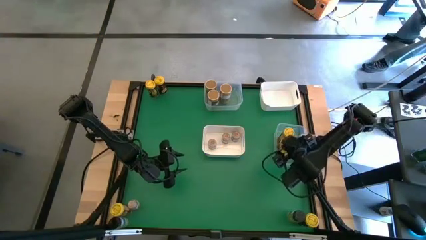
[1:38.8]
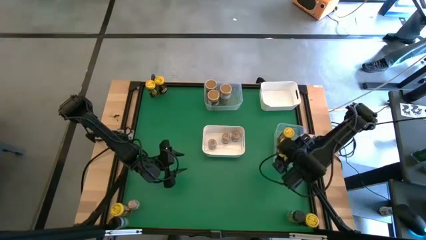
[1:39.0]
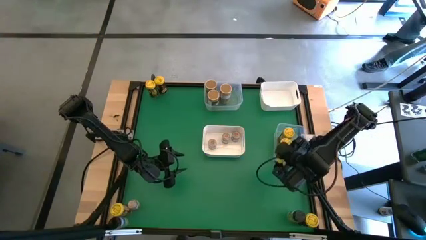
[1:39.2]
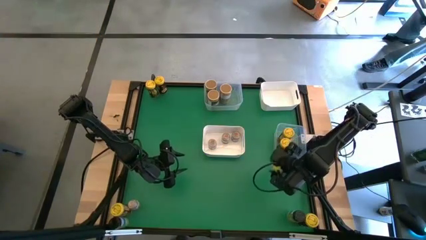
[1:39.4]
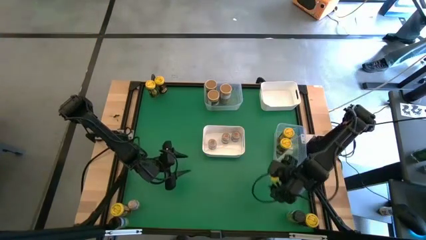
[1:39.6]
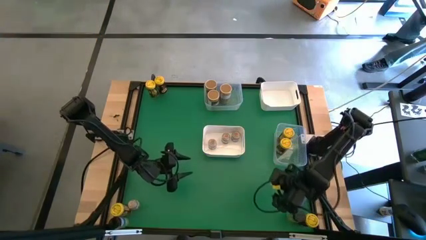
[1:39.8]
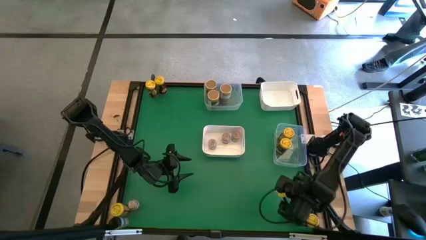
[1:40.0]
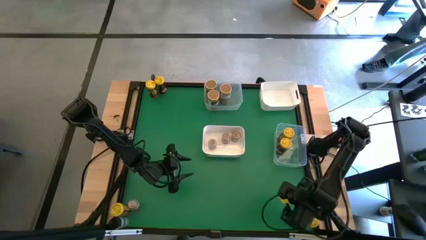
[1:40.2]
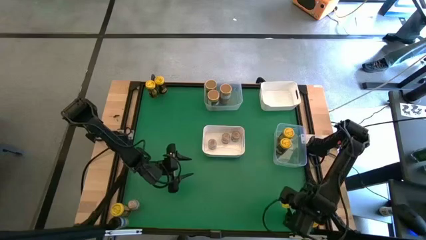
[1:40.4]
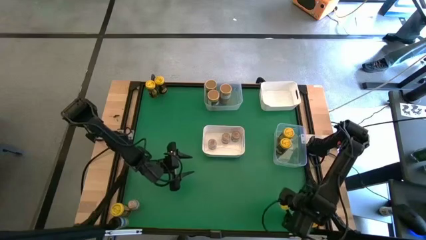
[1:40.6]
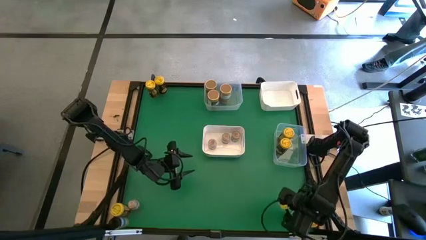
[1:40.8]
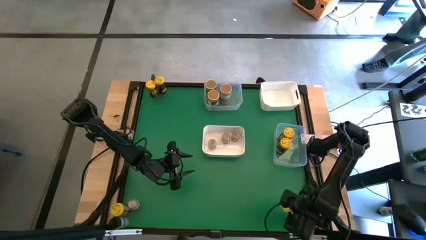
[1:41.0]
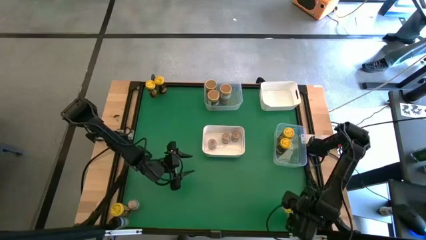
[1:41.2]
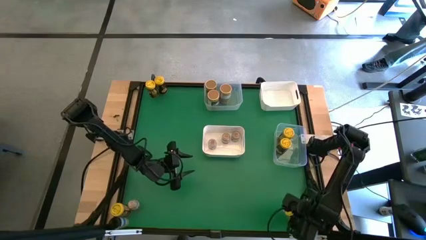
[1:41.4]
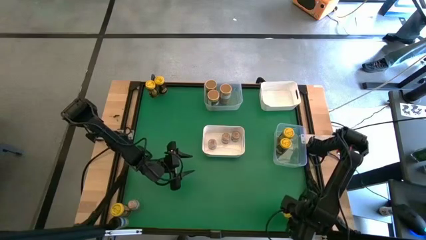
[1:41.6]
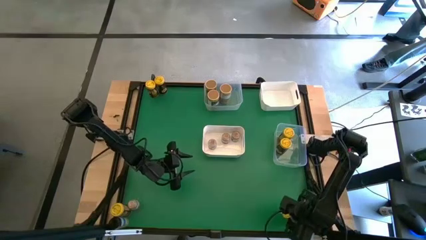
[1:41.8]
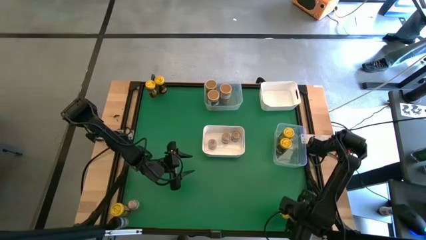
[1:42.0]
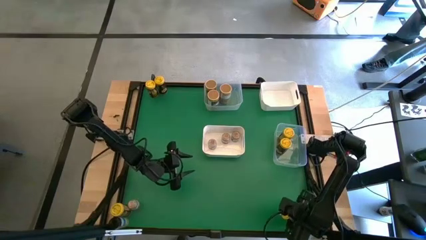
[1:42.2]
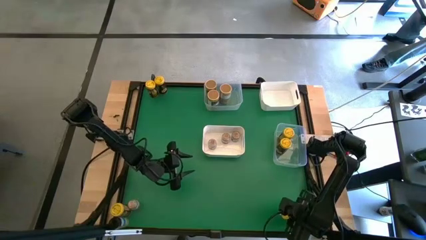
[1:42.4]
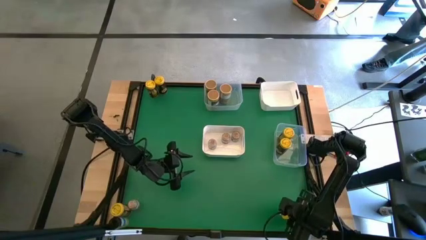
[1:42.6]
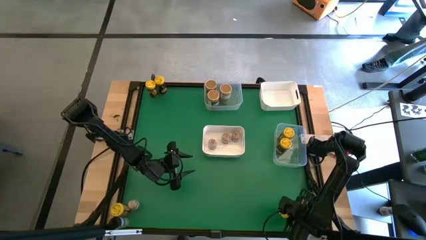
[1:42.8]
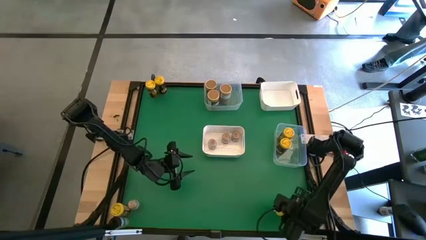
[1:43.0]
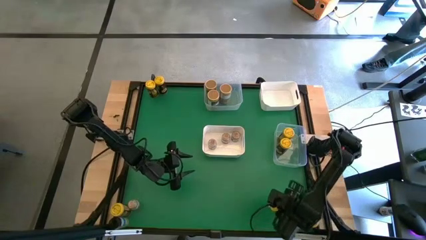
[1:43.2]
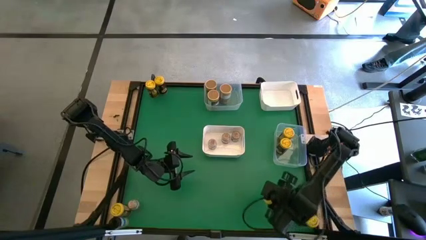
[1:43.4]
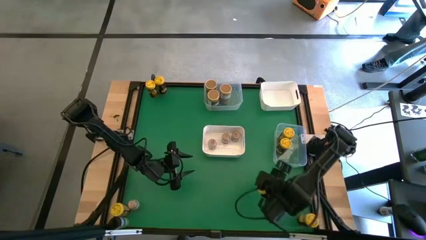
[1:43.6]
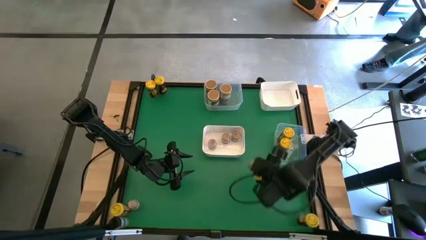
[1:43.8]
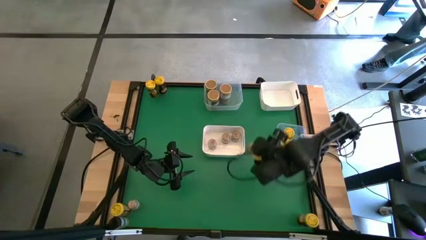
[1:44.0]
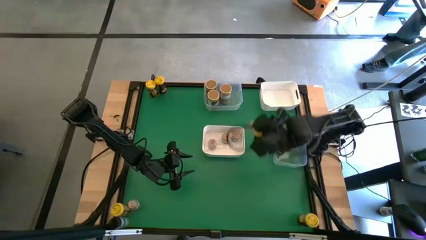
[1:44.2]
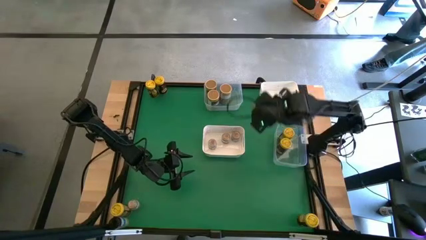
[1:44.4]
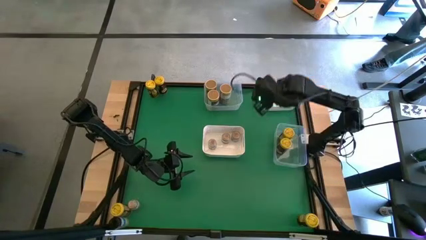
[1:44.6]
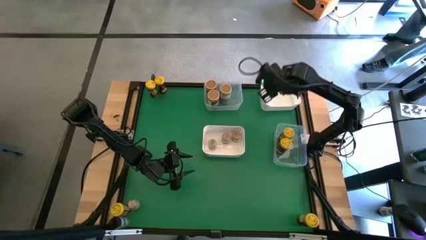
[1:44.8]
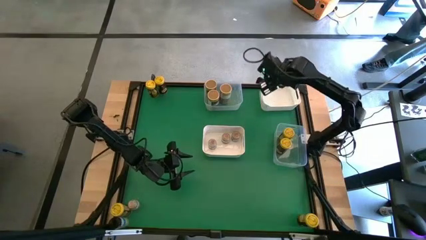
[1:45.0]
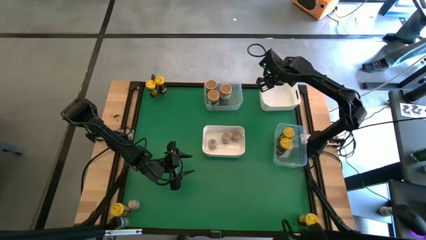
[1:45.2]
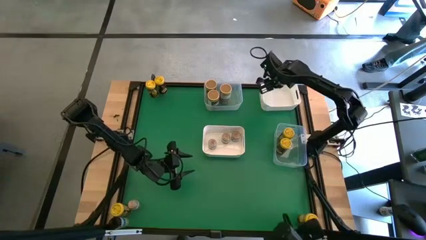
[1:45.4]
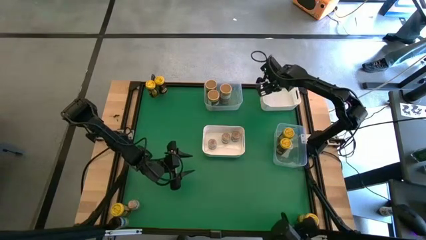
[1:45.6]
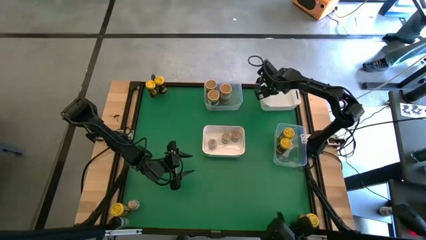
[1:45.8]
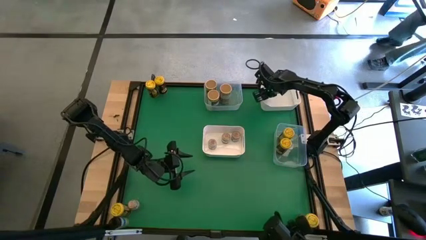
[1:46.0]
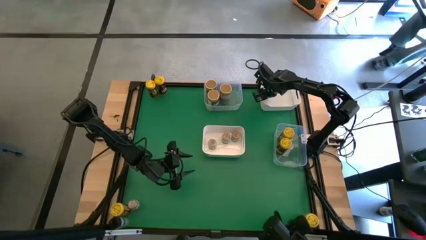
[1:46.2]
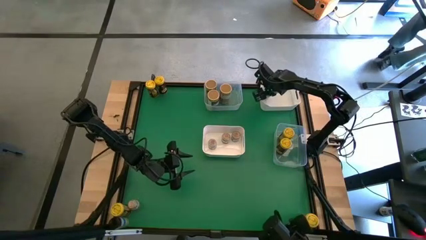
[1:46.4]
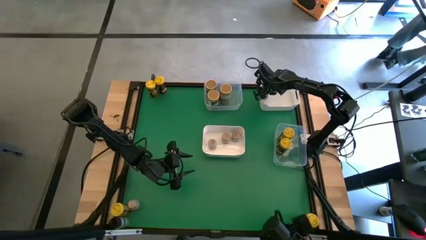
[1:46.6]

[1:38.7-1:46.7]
Task: Sort spices by type
Put the black seasoning bottle into the top white bin

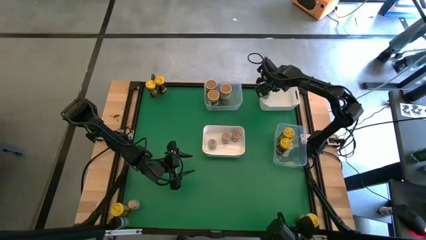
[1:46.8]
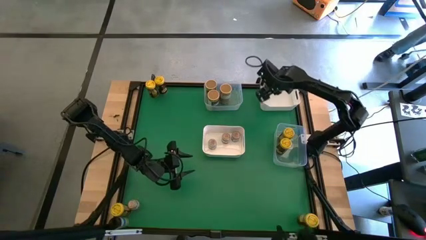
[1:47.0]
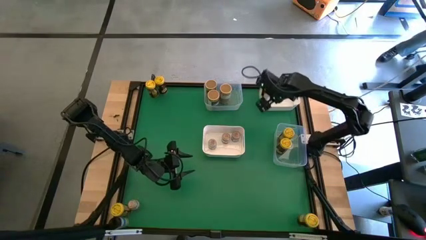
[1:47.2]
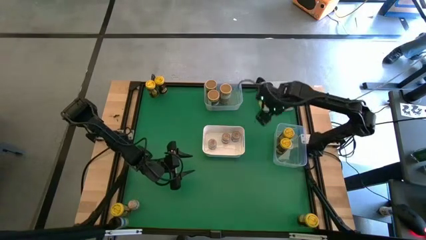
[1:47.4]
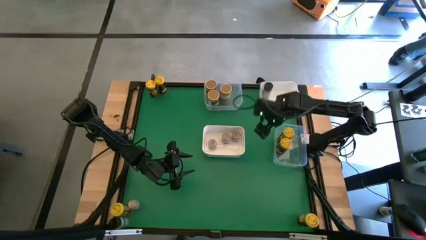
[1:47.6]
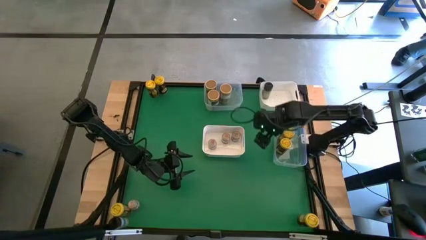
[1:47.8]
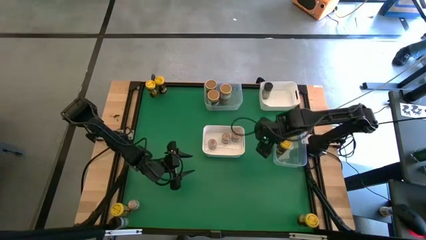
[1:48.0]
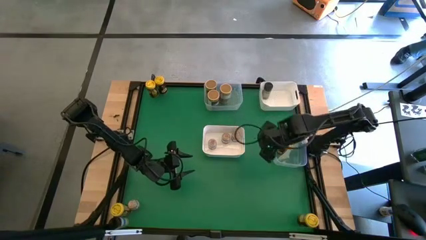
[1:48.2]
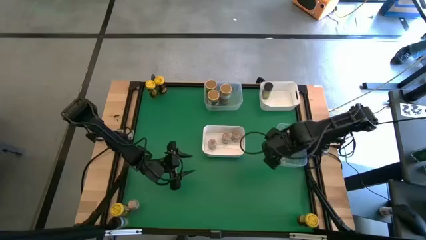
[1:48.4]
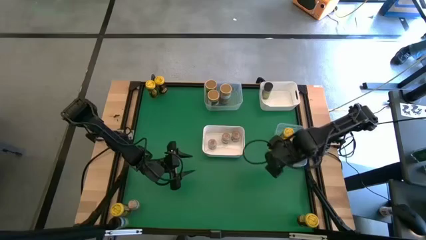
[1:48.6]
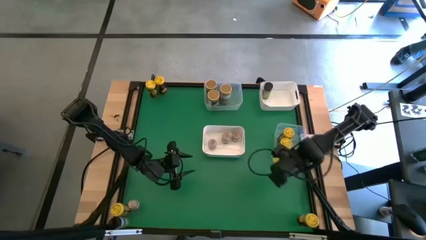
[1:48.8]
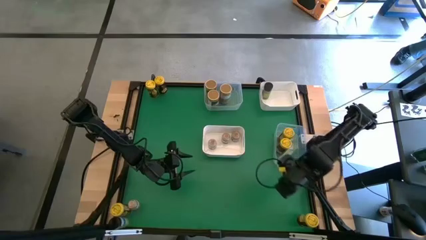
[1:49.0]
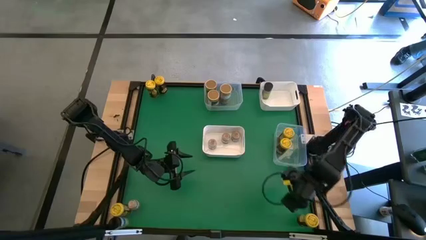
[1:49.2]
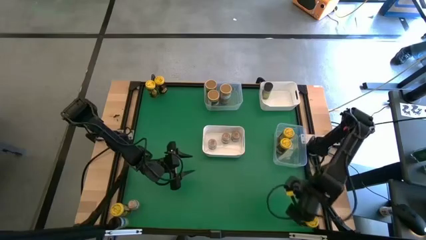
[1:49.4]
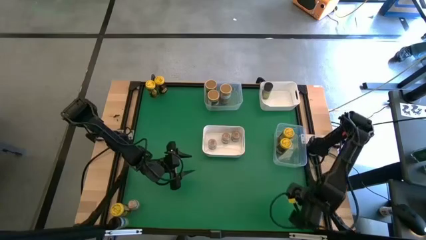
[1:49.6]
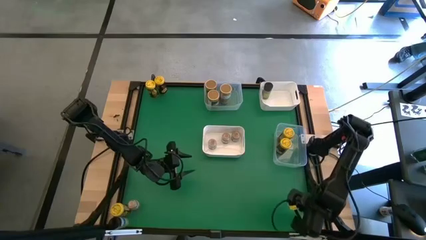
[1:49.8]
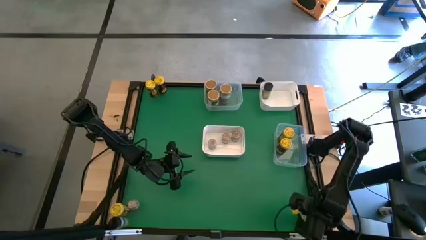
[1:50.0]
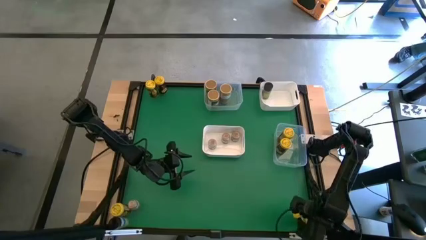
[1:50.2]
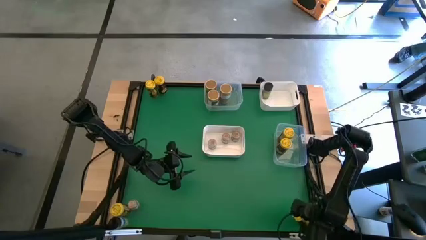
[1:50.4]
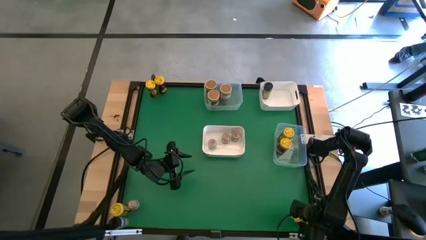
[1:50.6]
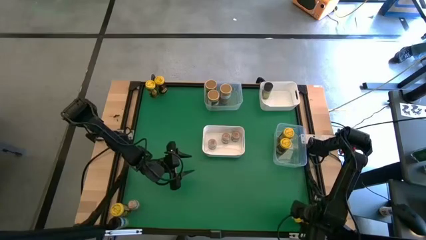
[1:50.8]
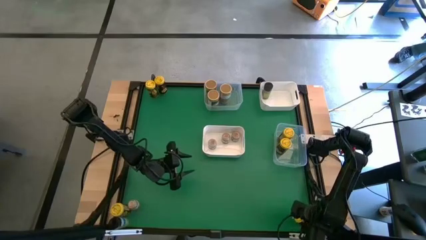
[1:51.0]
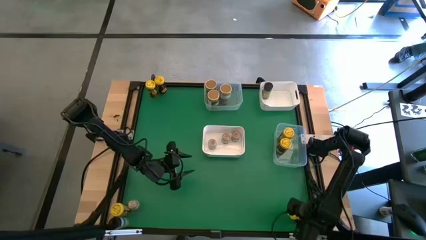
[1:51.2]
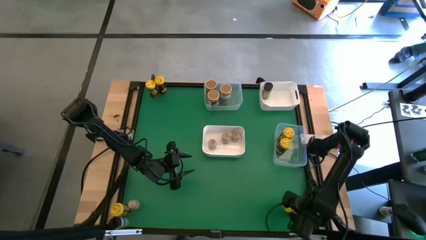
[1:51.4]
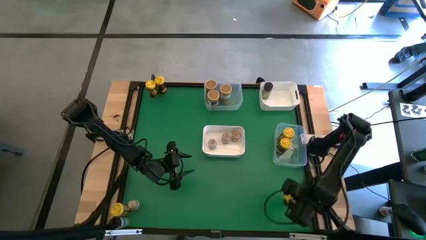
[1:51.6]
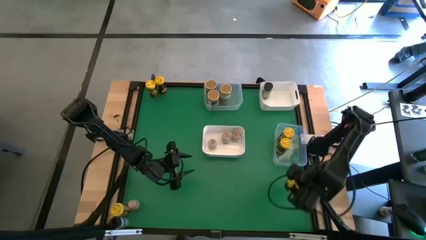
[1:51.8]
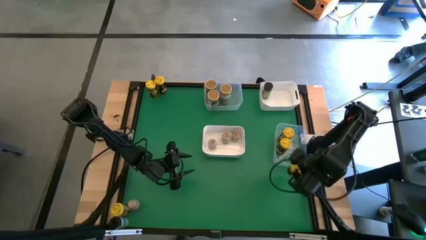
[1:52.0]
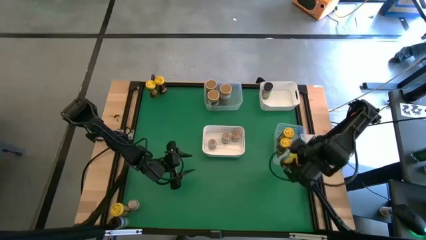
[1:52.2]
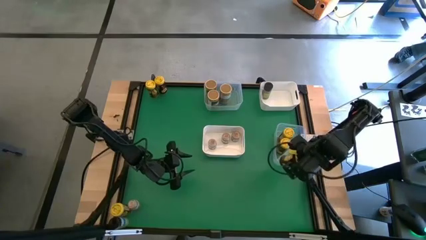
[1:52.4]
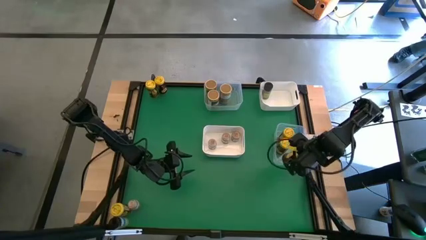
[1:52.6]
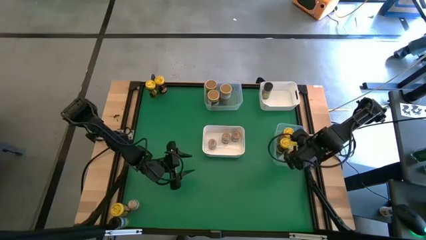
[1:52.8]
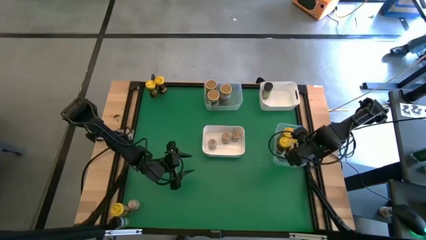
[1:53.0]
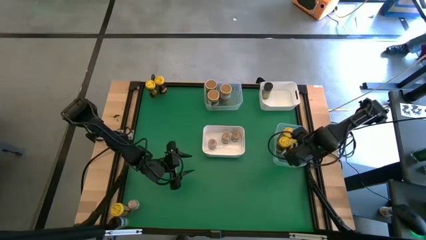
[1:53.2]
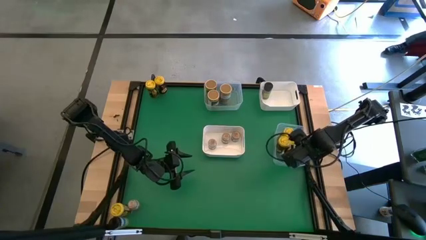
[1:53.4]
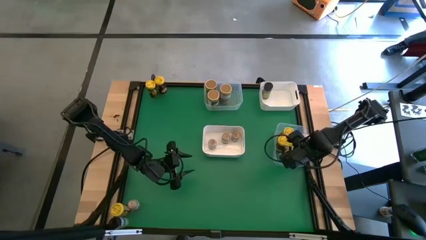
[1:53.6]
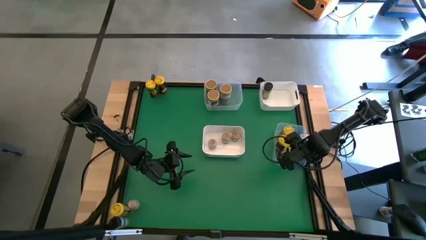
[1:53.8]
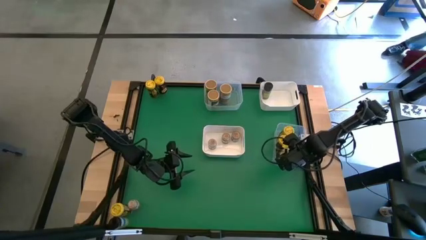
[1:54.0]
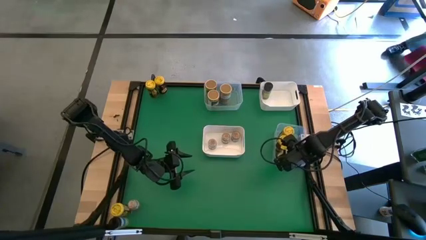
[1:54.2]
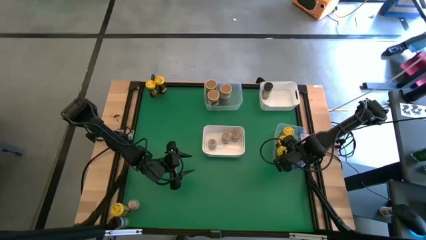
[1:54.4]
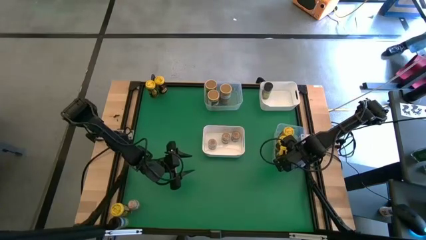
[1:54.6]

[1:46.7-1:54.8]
Put the yellow seasoning can into the bottom transparent bin
